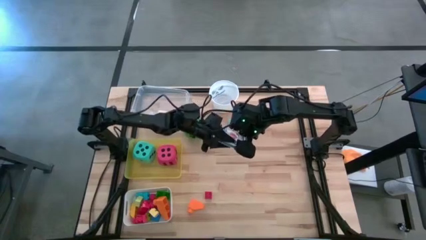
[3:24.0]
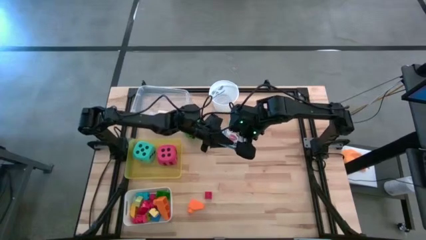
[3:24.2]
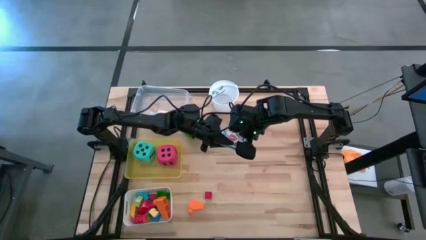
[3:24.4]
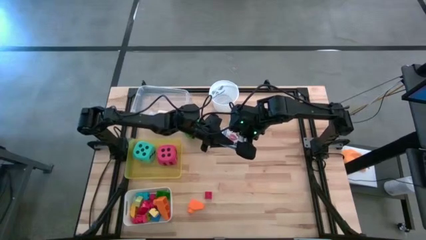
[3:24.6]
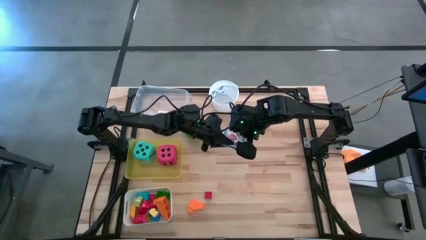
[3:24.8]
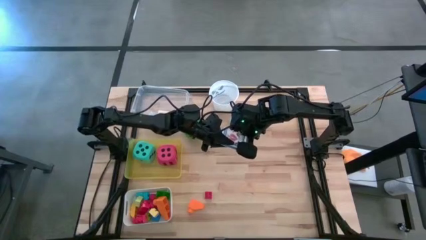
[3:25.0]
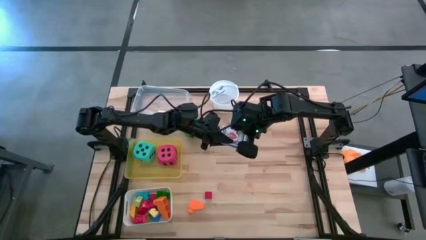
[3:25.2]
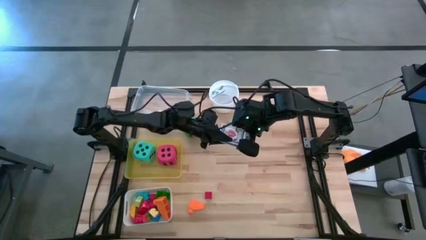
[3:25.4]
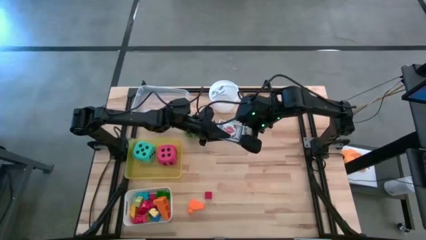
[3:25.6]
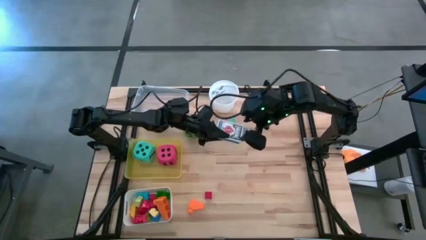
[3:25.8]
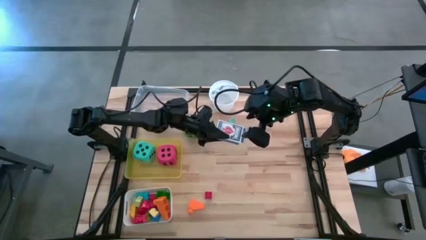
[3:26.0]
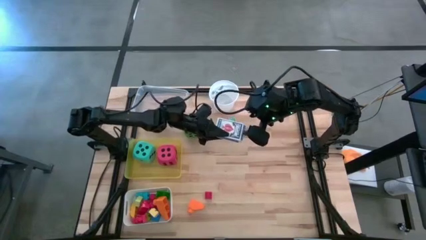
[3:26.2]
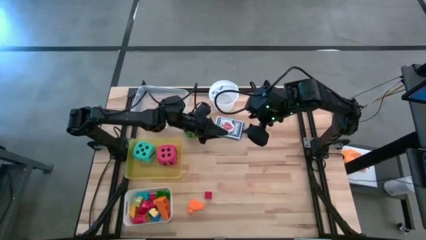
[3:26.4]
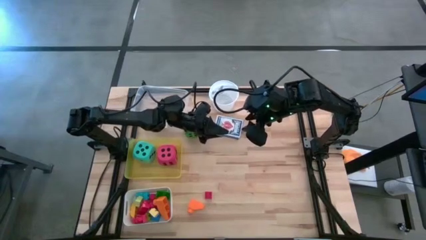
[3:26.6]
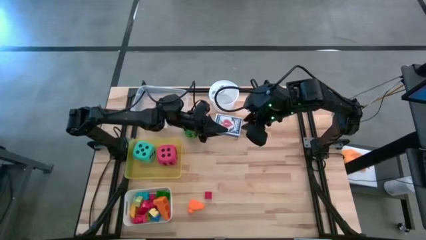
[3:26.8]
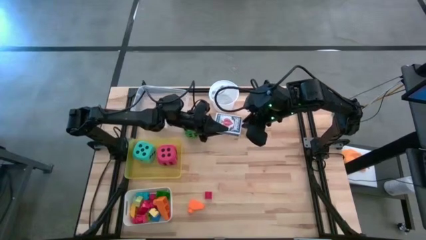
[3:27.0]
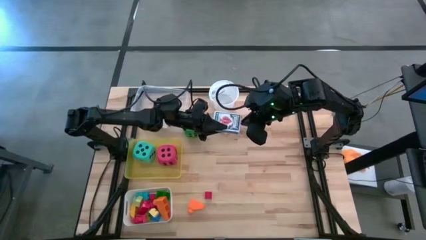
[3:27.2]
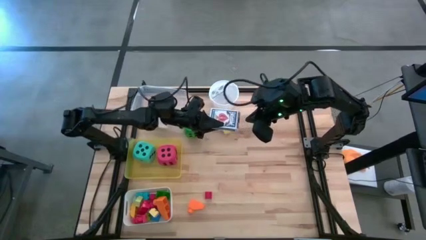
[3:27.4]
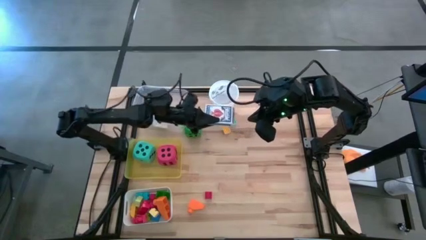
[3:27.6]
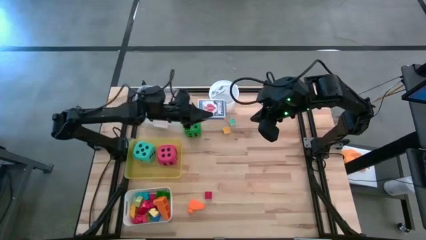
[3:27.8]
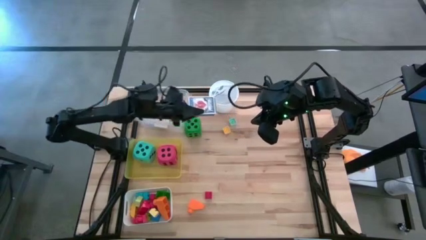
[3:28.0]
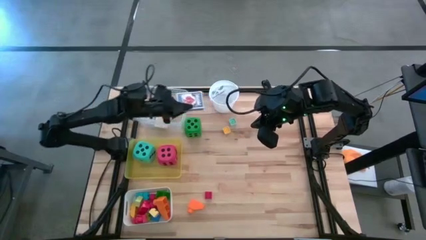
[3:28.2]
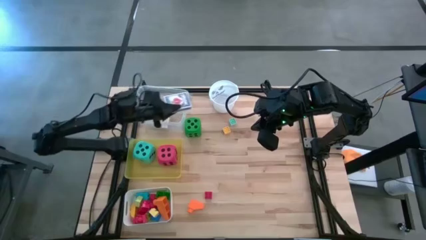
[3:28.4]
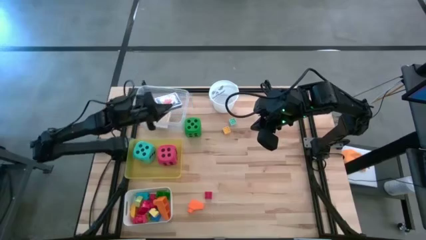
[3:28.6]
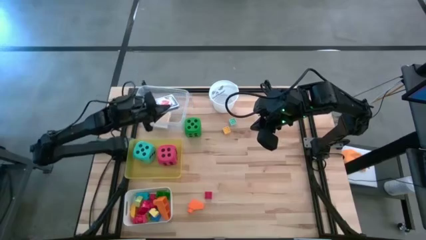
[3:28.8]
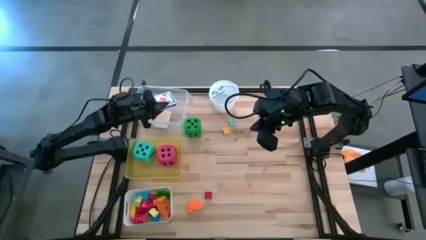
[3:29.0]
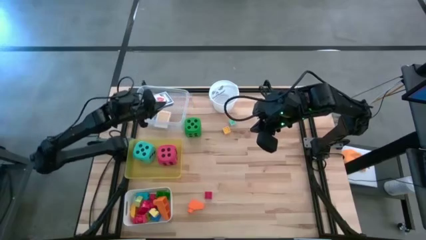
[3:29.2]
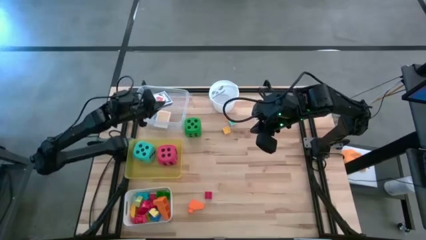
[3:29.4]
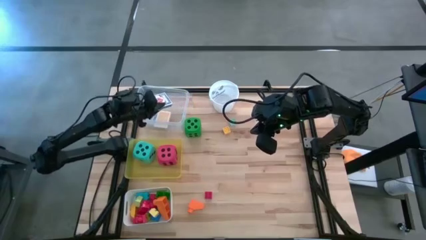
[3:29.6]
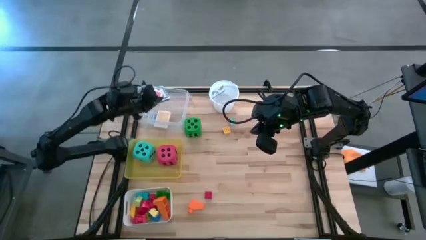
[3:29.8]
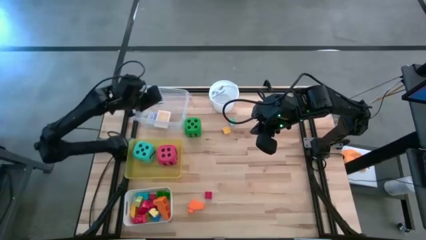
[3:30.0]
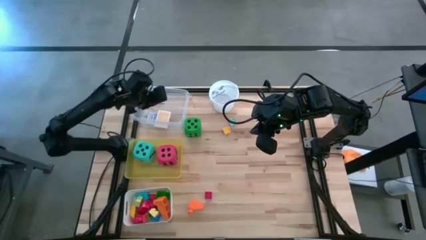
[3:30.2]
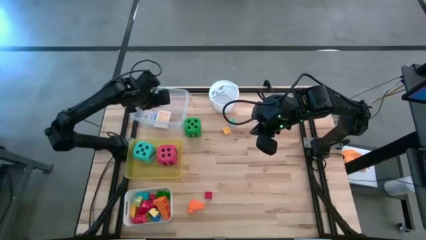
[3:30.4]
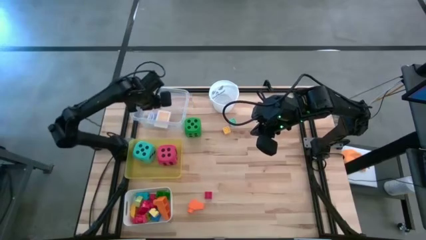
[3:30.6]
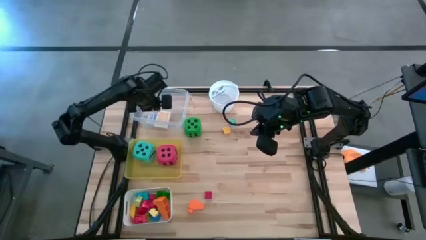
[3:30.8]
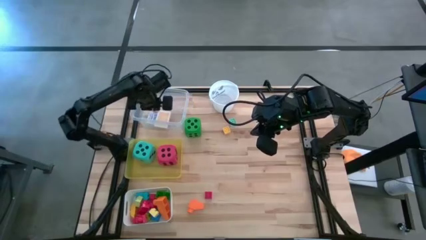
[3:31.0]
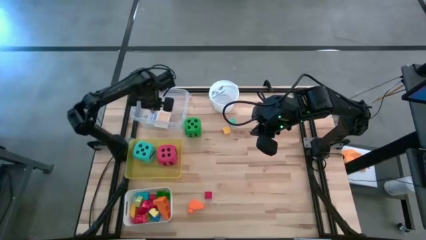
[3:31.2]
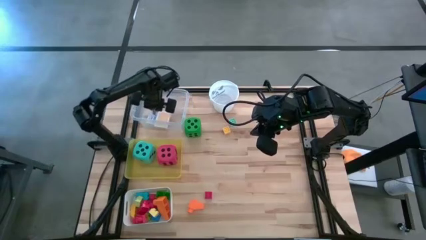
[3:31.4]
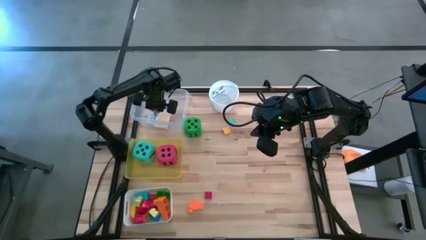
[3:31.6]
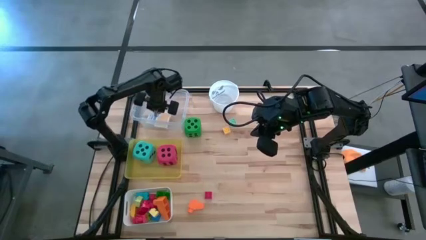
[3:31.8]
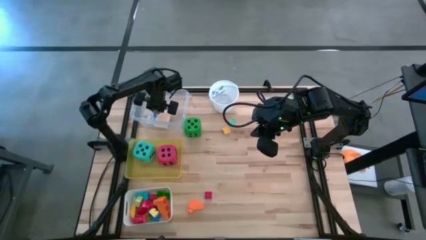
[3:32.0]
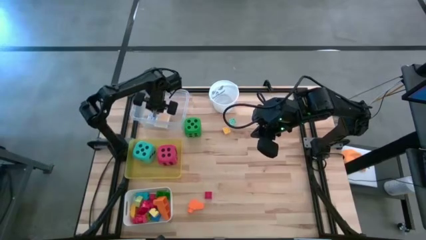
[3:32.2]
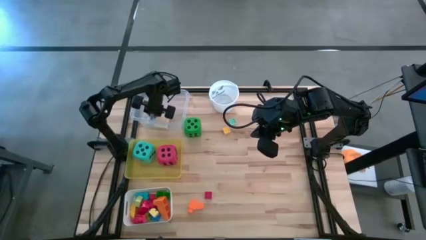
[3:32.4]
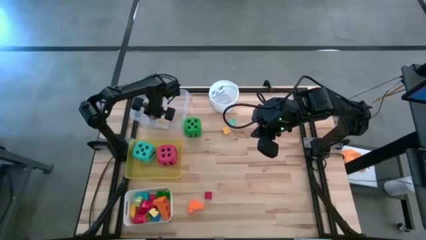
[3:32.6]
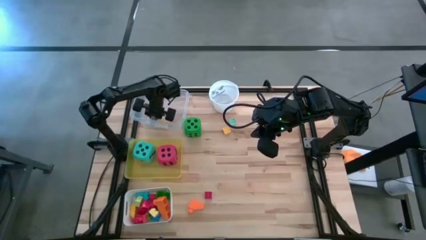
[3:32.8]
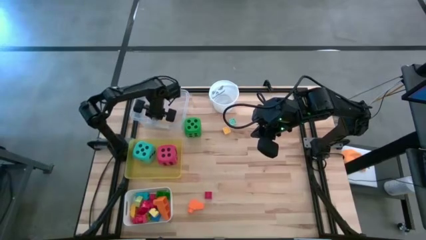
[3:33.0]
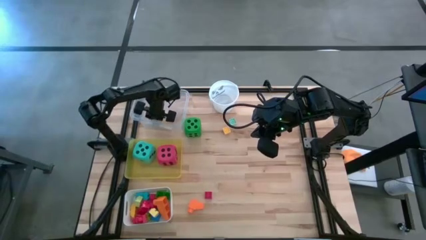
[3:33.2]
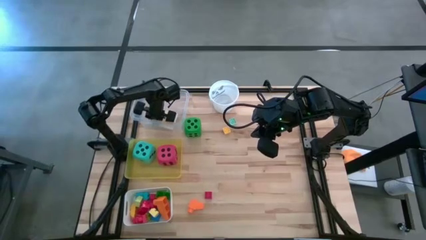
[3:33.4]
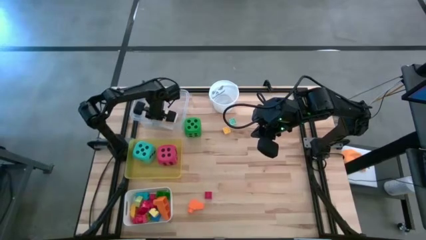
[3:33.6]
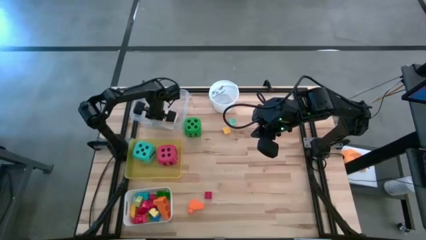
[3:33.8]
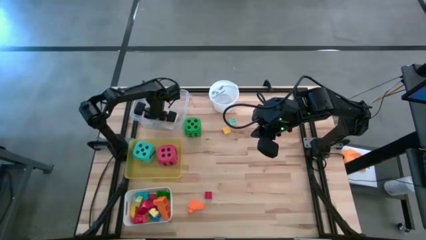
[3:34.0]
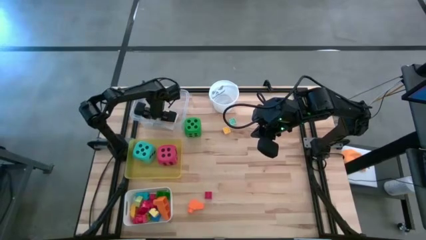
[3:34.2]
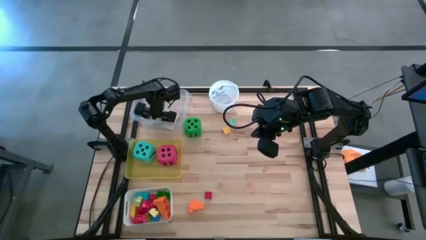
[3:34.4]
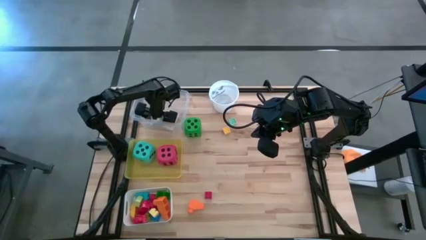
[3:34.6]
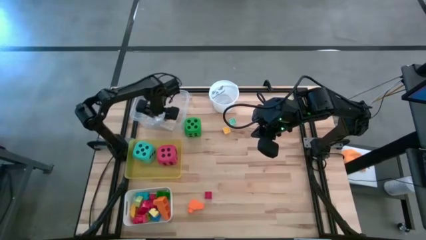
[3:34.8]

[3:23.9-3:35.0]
Task: Pick & Place Toys
Put the red deck of cards into the transparent bin

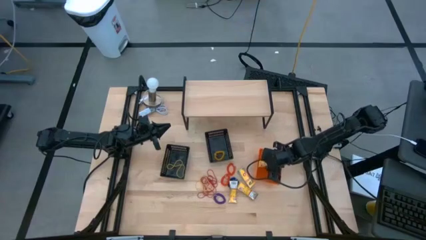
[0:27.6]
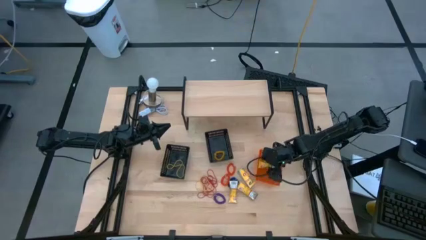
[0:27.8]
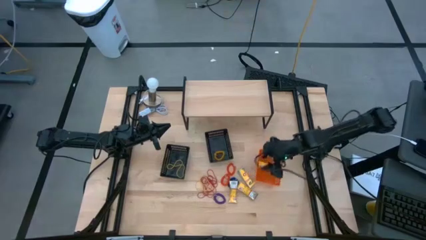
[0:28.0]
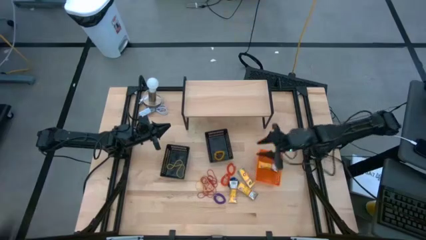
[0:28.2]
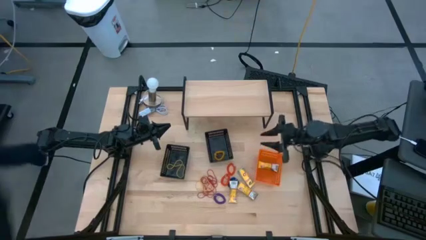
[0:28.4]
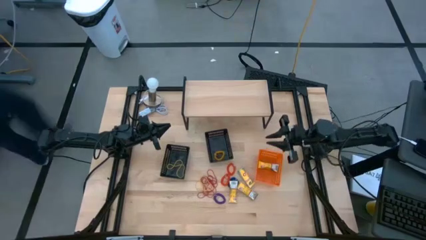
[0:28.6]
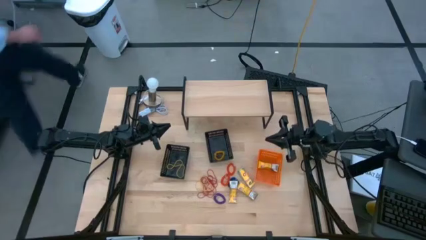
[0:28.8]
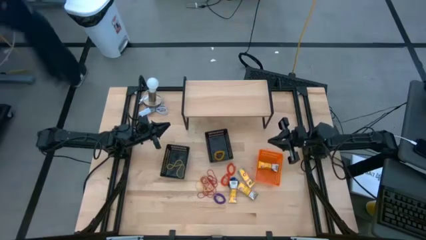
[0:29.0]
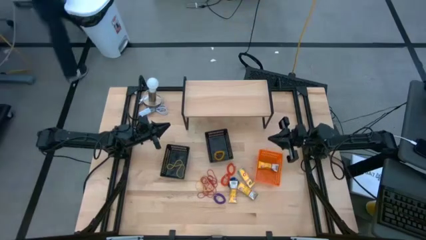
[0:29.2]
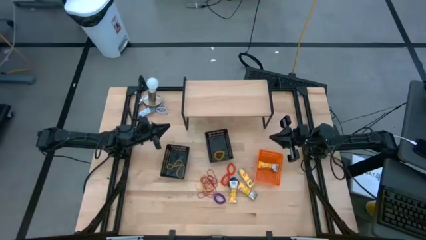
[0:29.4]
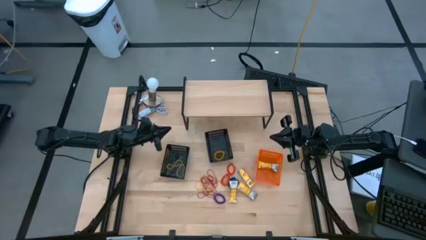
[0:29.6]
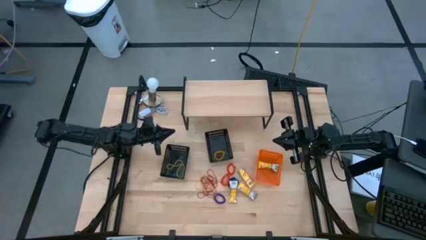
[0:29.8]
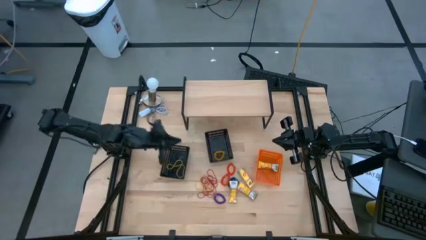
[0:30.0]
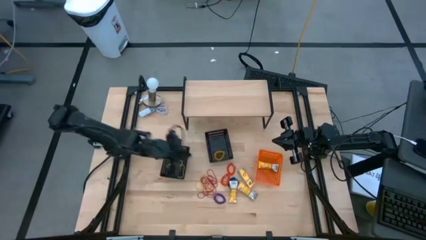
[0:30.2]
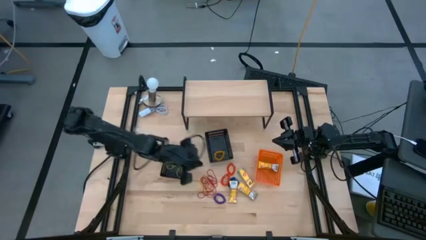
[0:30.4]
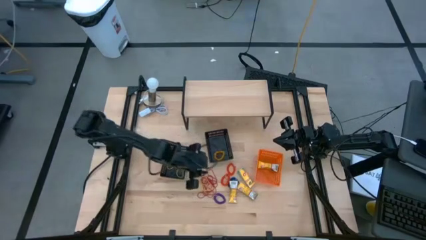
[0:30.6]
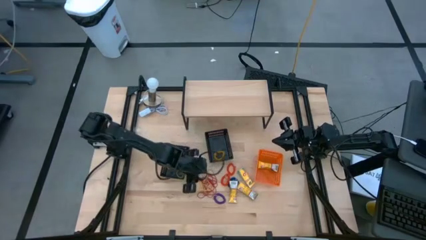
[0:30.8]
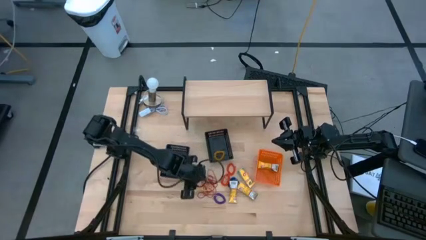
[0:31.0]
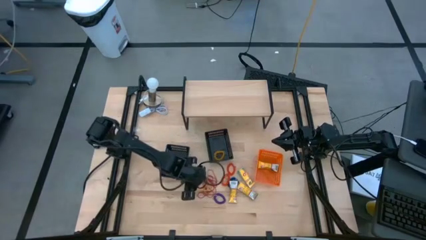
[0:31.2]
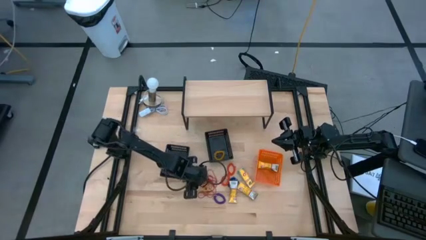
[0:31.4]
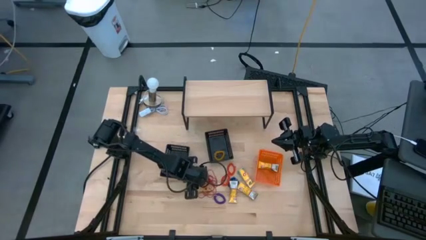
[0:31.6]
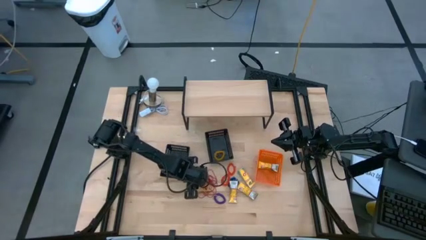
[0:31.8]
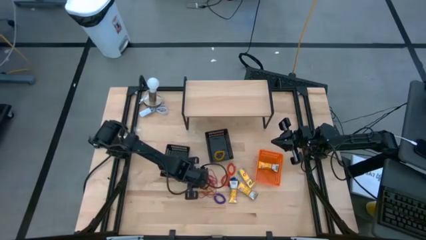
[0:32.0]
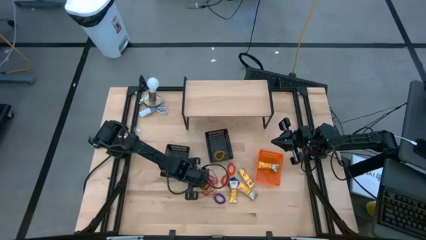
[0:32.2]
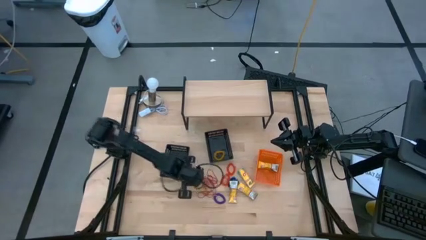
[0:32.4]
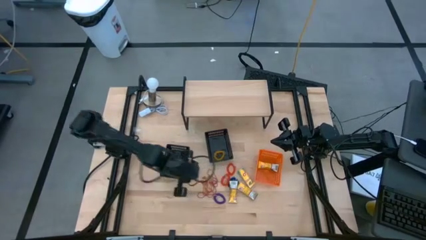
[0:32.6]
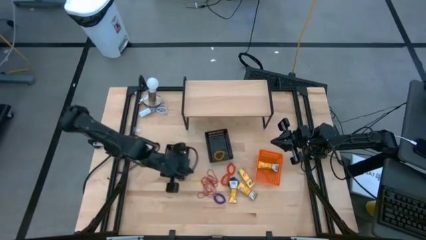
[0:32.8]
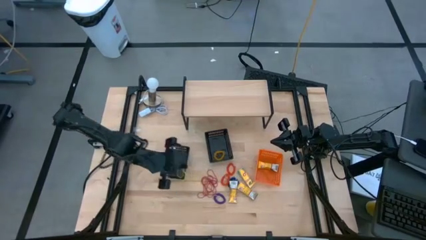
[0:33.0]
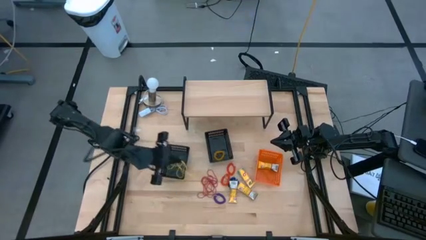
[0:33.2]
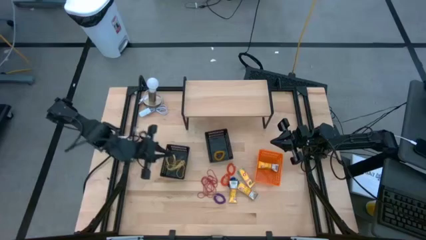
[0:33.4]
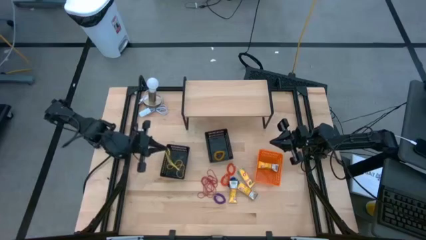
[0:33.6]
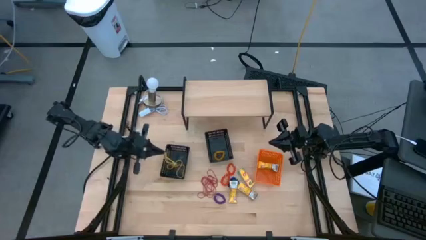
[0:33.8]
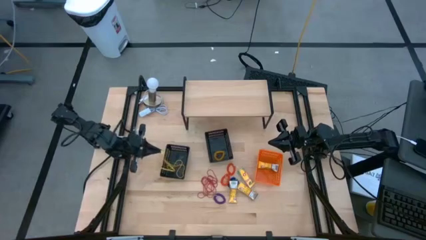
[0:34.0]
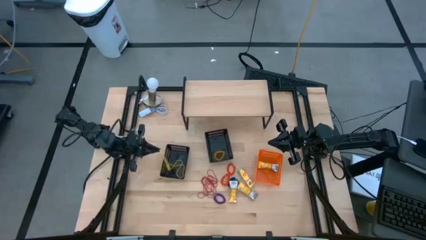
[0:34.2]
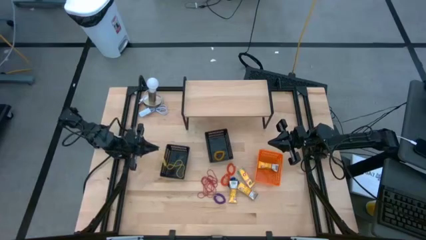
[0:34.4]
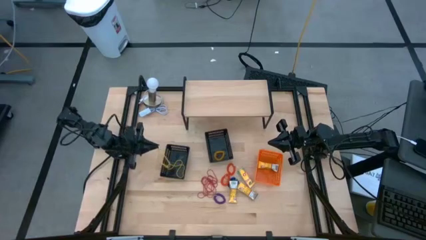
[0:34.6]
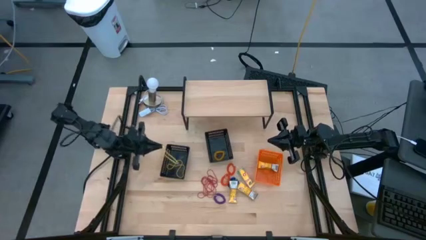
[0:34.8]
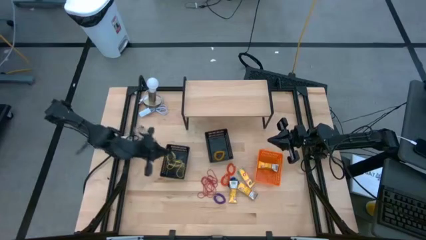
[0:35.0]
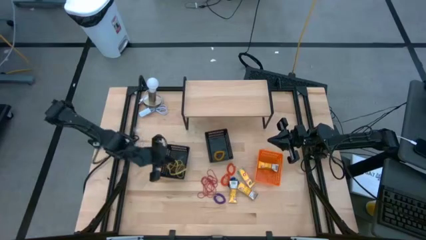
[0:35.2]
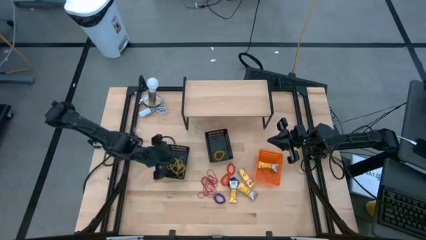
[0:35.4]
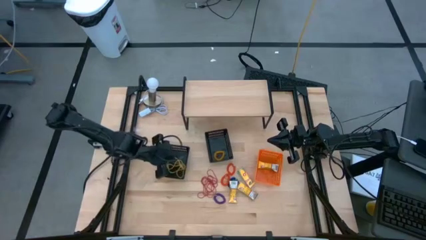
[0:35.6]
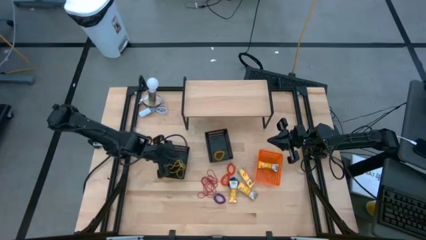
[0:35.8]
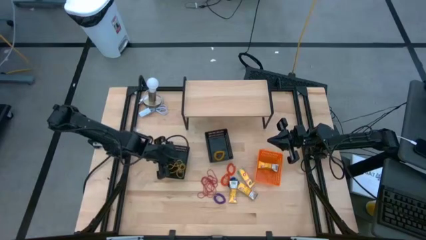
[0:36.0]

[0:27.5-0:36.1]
Task: Pick & Place Office Desk Supplies
Put the yellow rubber band into the left black bin
